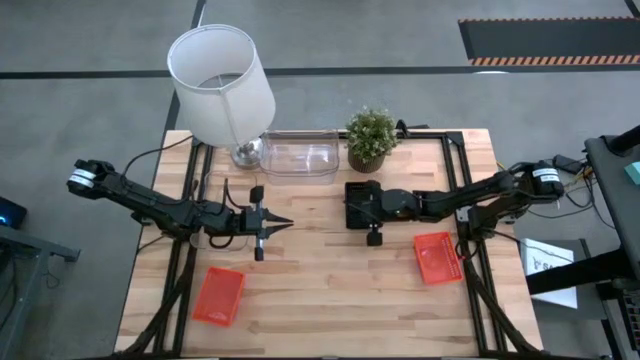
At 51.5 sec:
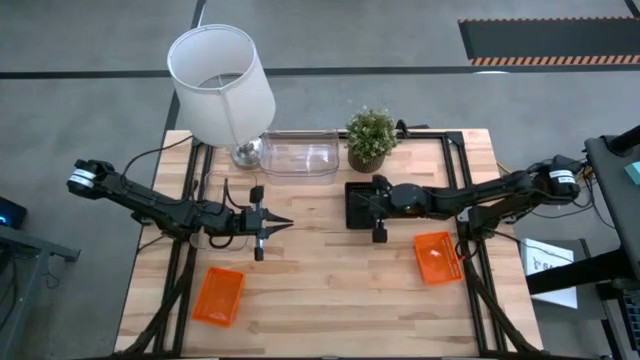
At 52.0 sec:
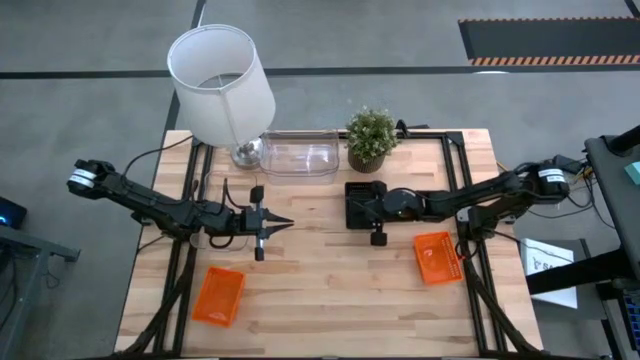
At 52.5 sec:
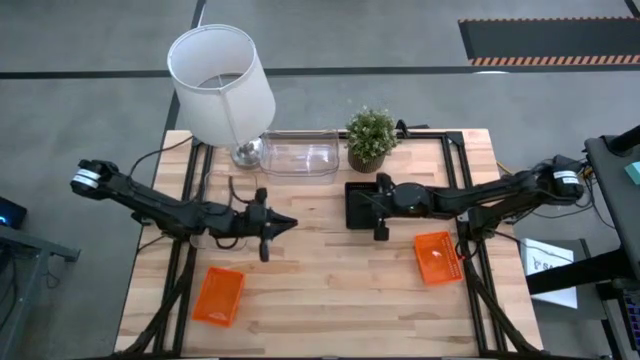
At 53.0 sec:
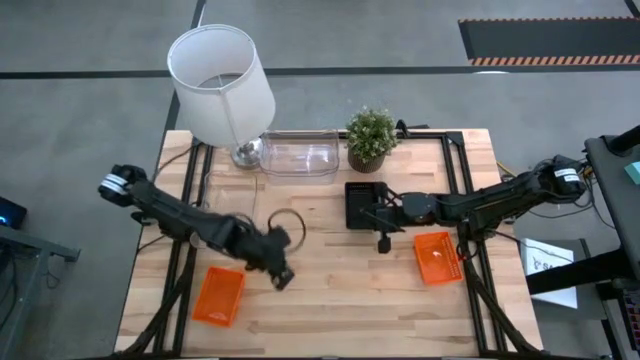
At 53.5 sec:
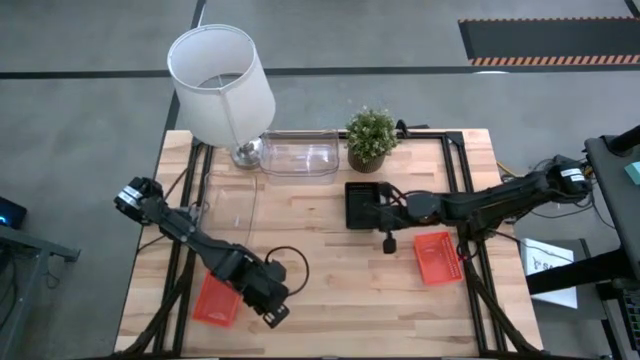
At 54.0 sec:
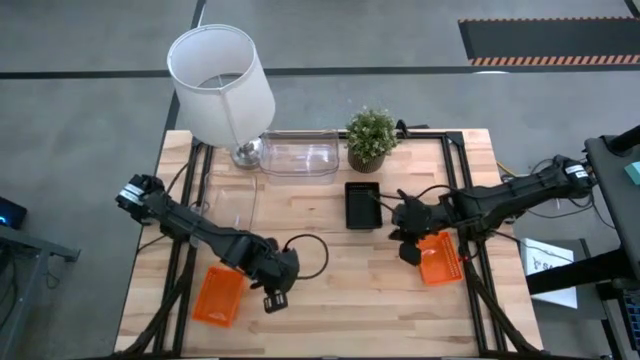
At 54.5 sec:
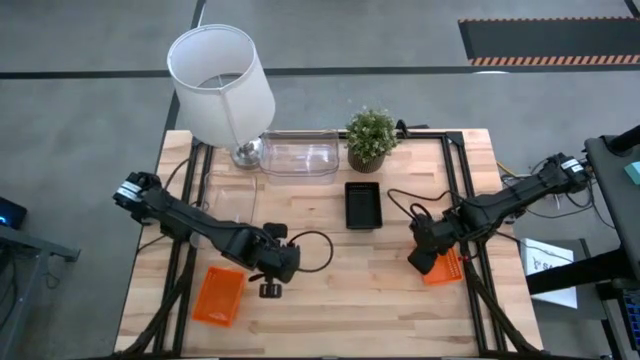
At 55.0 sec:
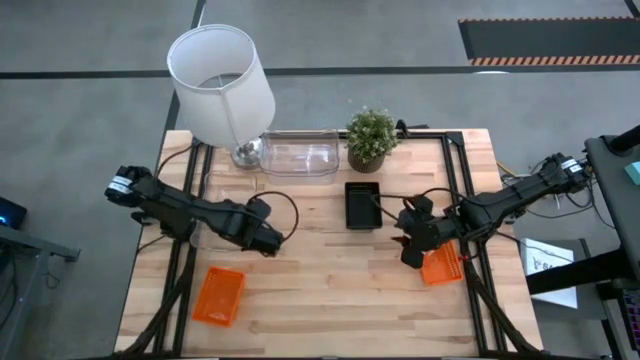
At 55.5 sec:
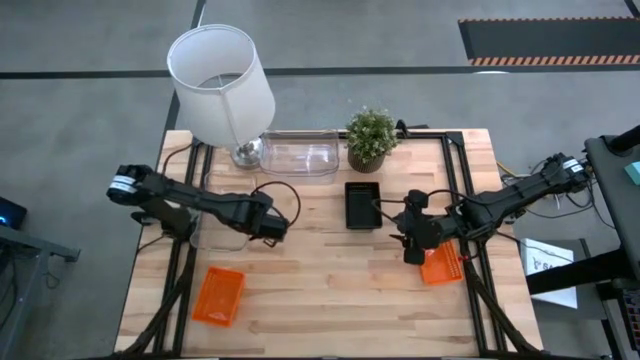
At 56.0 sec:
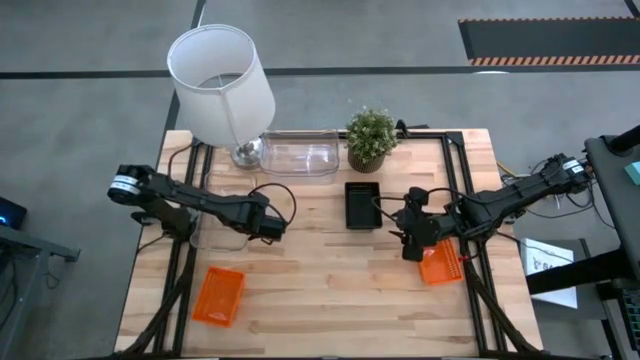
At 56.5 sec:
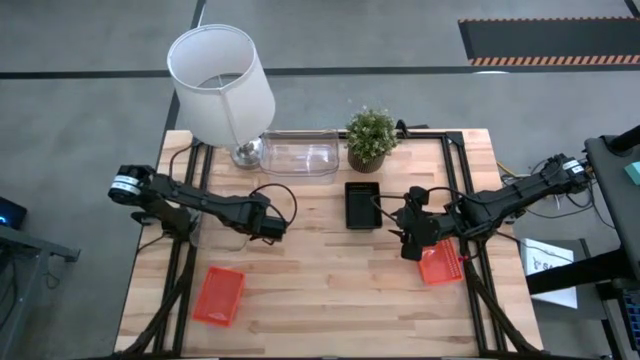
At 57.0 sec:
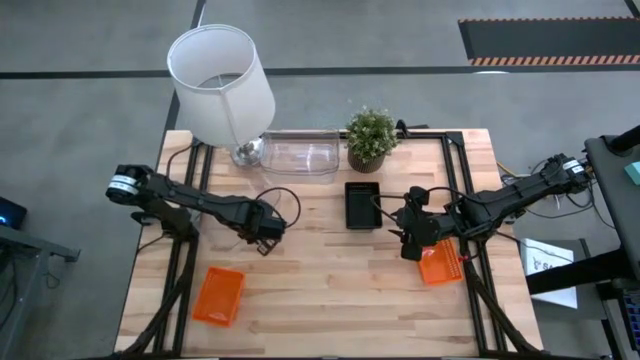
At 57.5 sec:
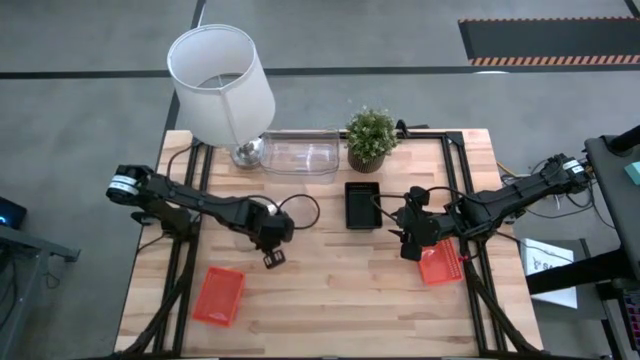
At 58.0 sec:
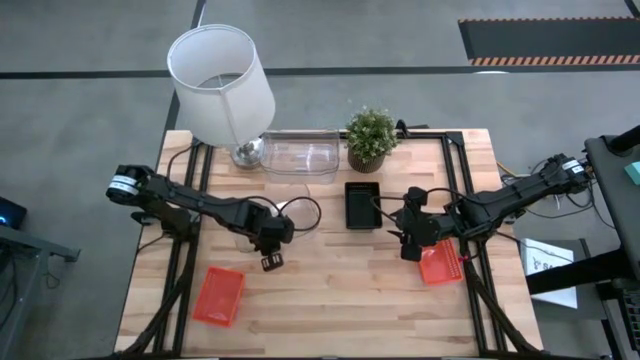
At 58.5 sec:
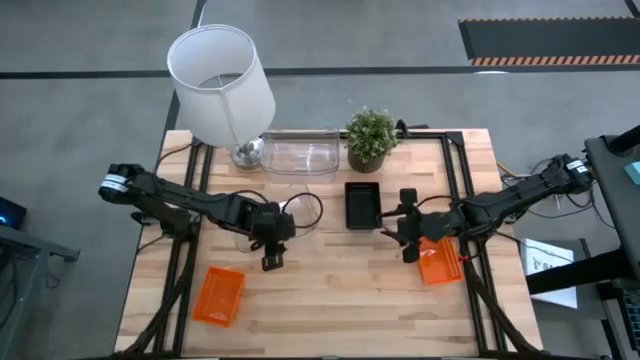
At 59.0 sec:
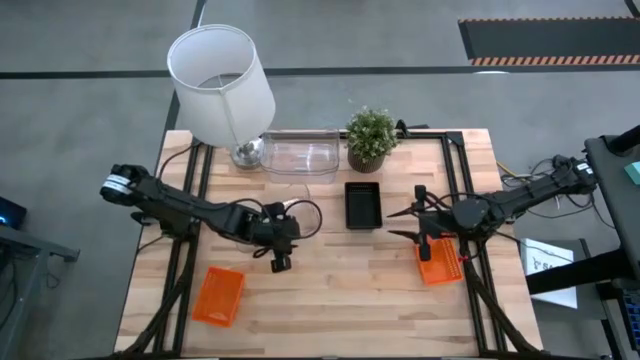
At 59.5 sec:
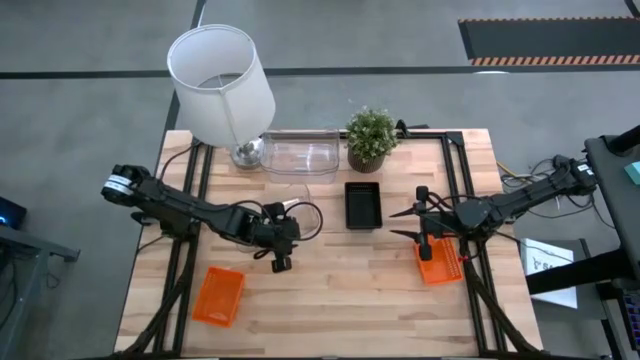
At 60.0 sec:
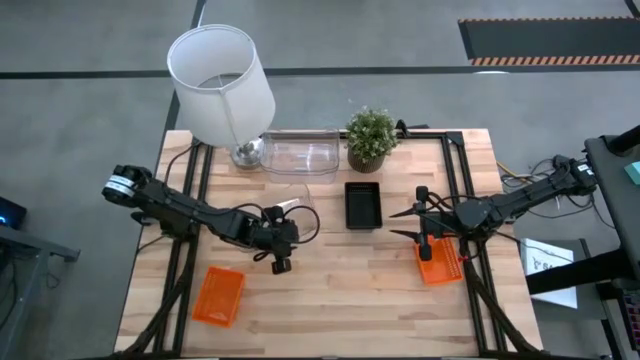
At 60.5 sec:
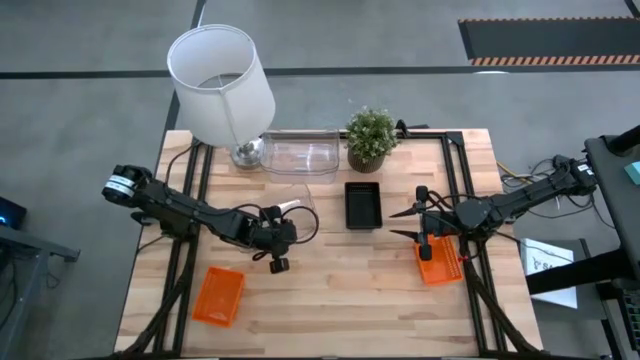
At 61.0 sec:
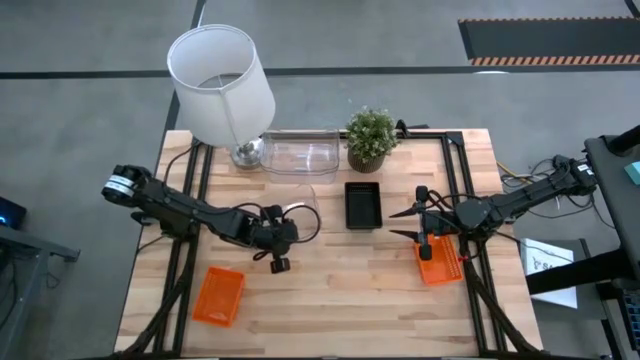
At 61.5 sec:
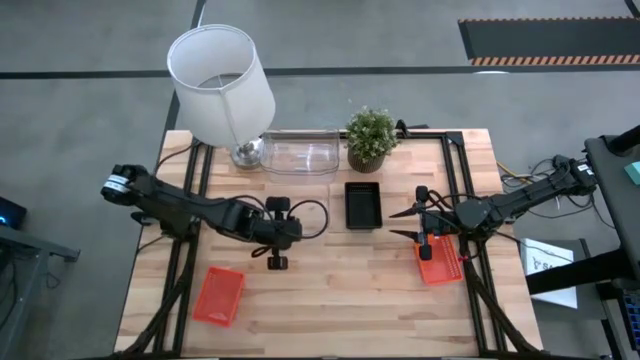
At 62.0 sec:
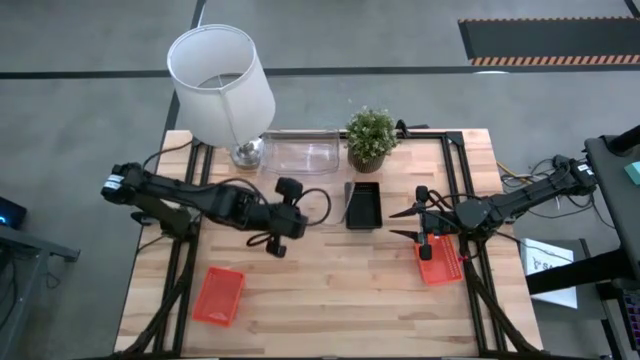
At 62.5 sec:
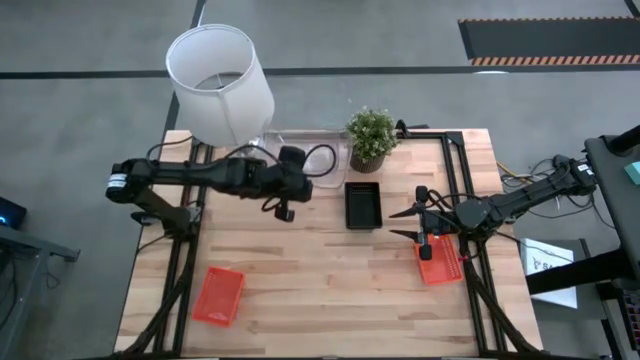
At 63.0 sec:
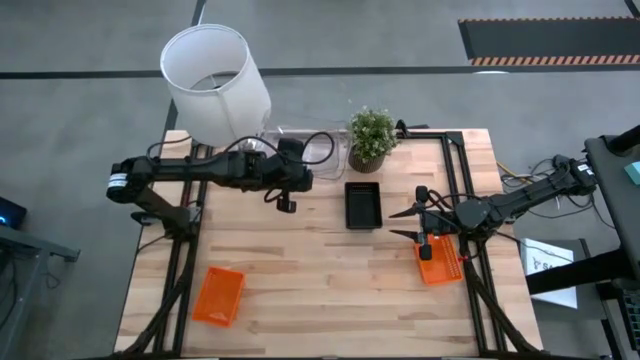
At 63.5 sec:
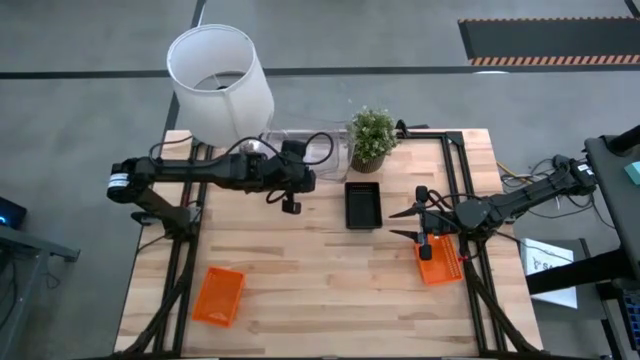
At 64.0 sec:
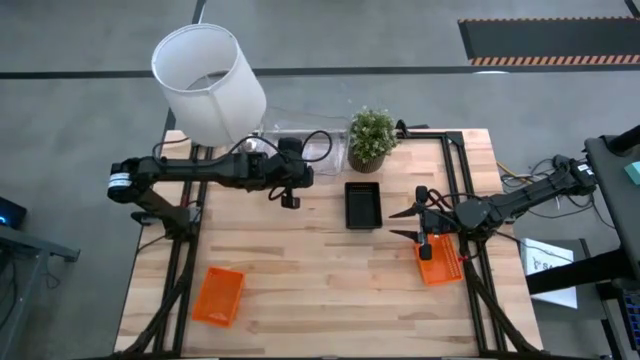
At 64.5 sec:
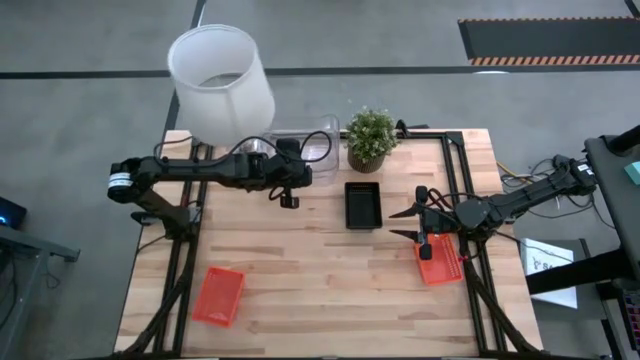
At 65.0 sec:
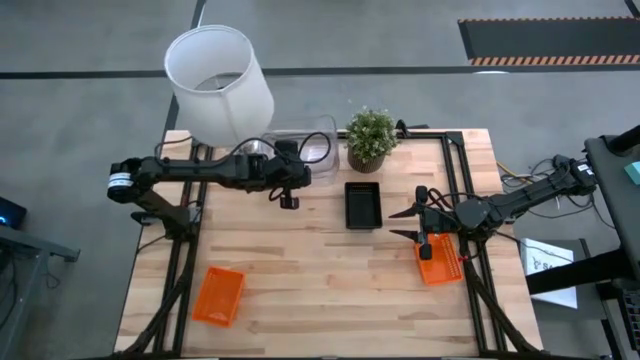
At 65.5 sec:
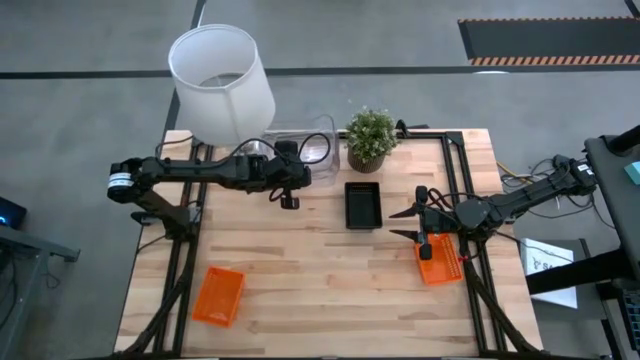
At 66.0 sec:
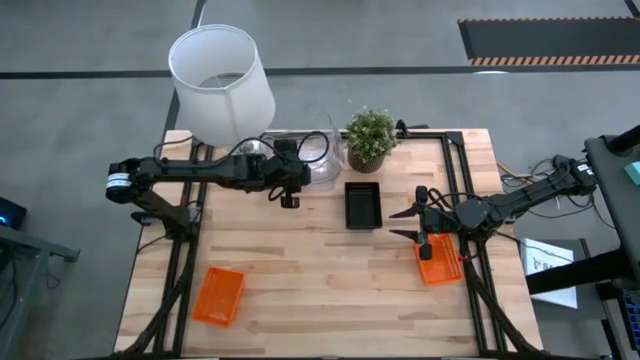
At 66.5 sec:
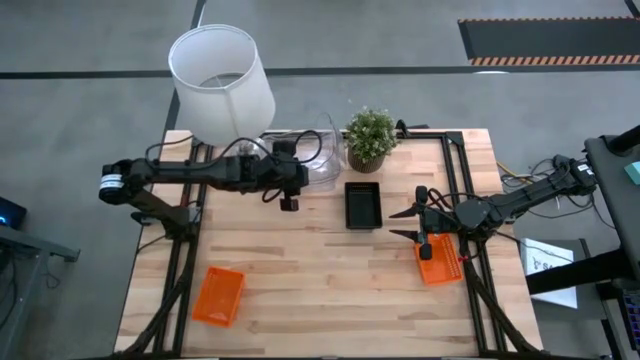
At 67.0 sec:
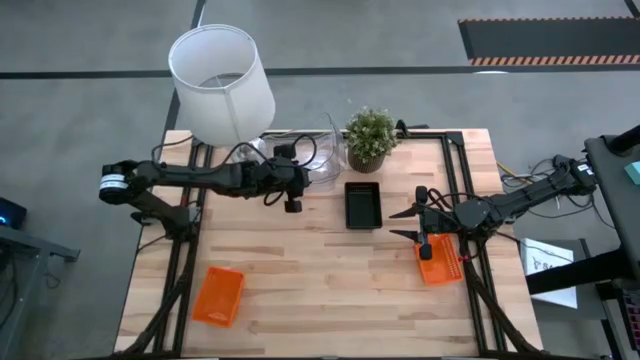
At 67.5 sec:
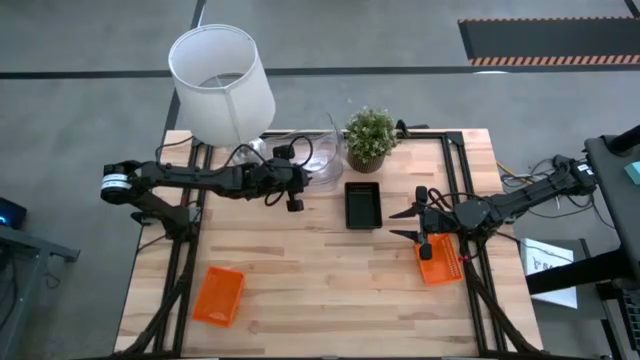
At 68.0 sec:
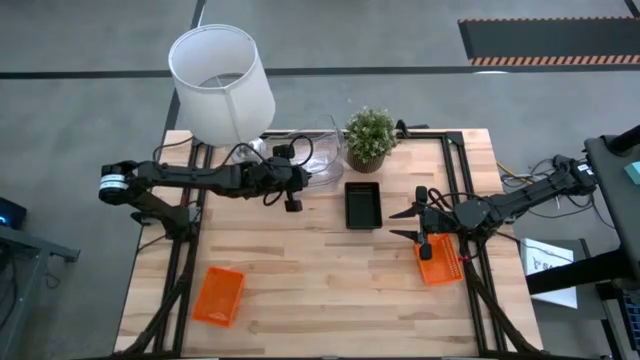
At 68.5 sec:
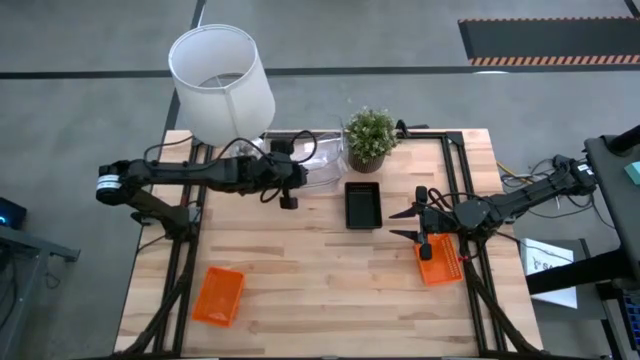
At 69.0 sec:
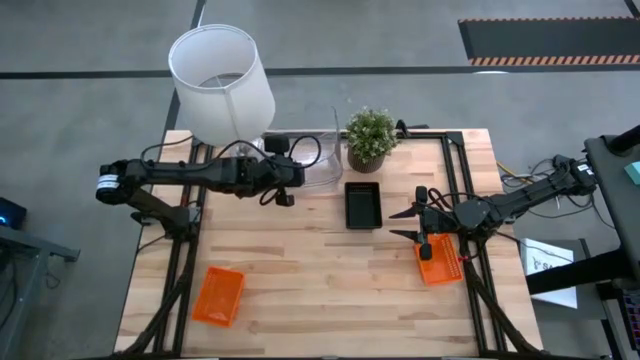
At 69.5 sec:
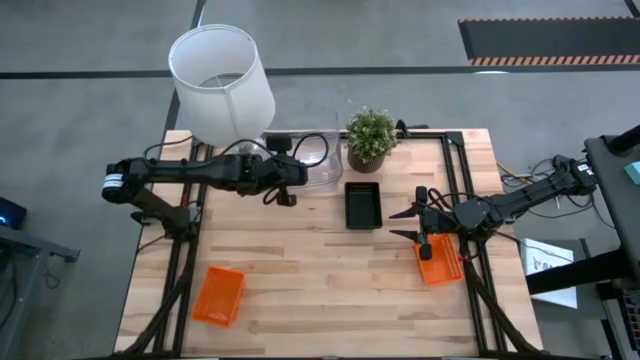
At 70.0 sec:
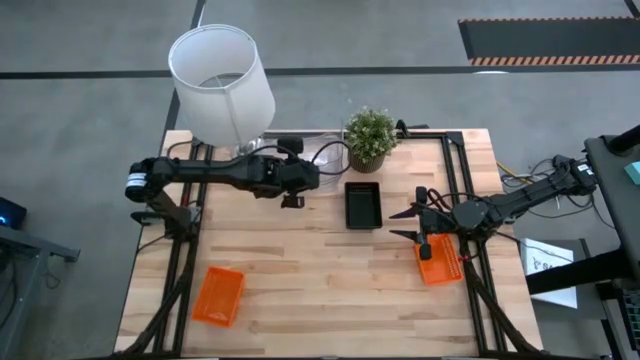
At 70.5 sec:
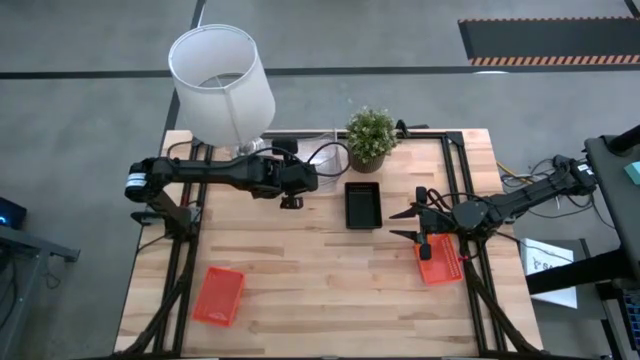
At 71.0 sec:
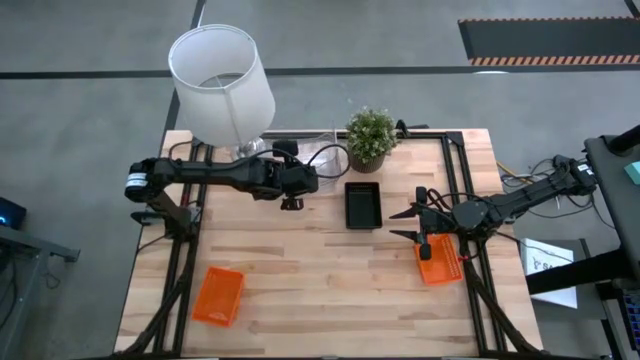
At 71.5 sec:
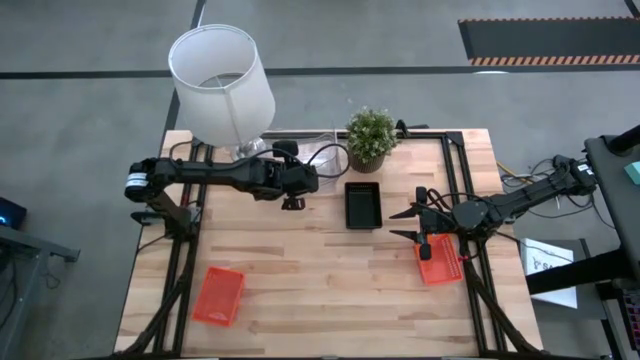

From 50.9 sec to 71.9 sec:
Stack the bottom transparent bin on the top transparent bins
